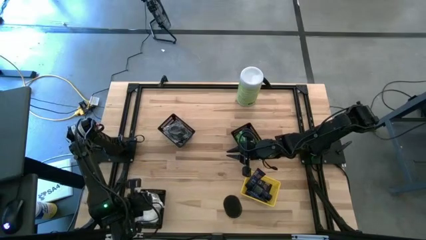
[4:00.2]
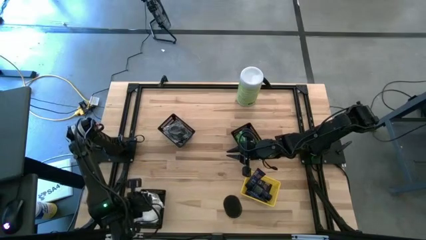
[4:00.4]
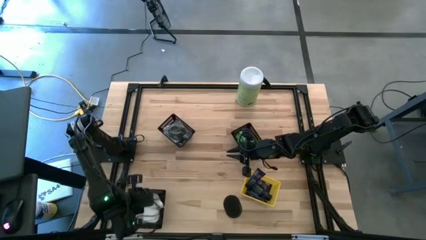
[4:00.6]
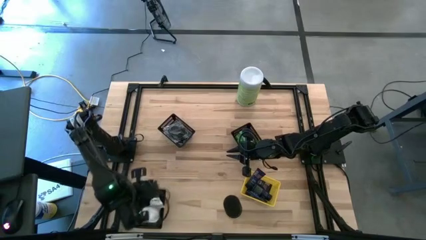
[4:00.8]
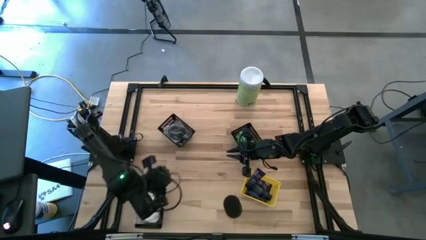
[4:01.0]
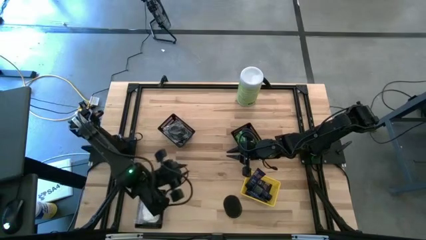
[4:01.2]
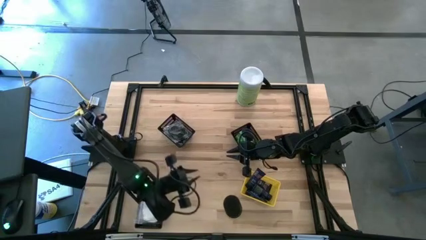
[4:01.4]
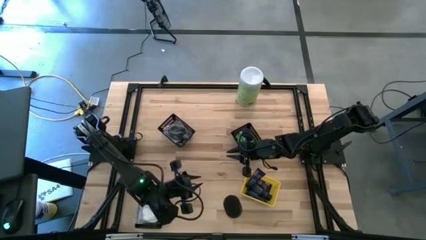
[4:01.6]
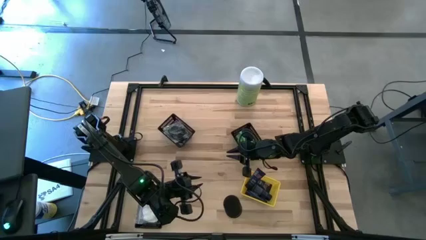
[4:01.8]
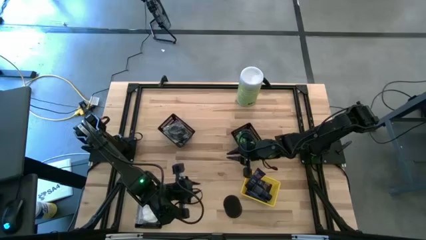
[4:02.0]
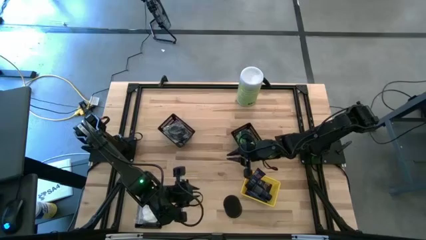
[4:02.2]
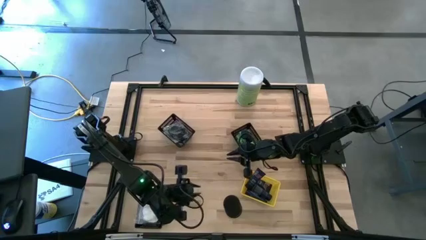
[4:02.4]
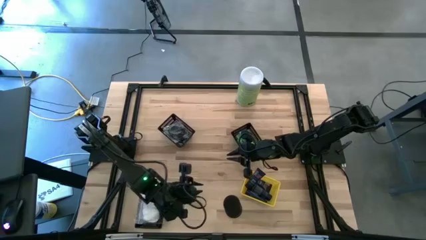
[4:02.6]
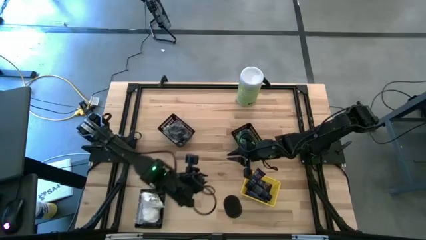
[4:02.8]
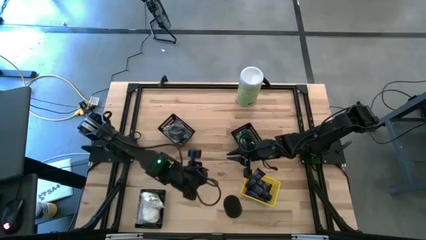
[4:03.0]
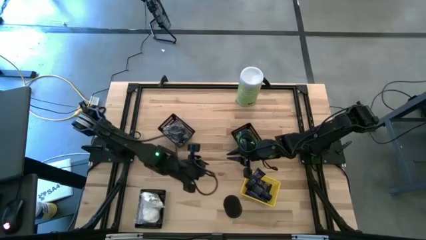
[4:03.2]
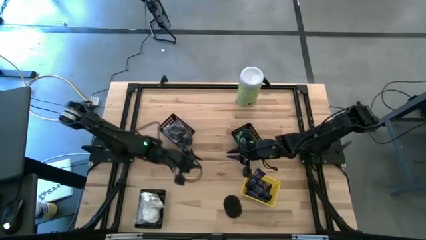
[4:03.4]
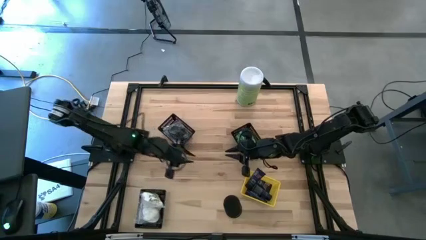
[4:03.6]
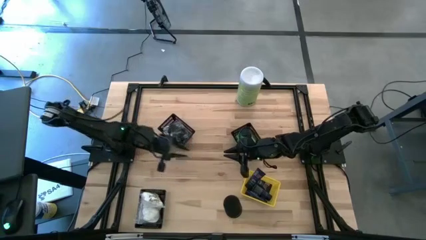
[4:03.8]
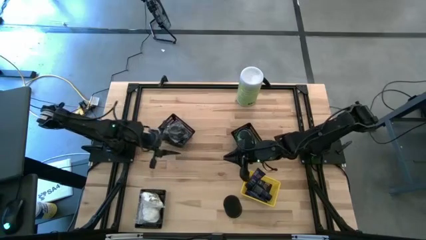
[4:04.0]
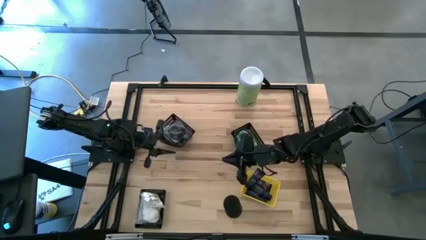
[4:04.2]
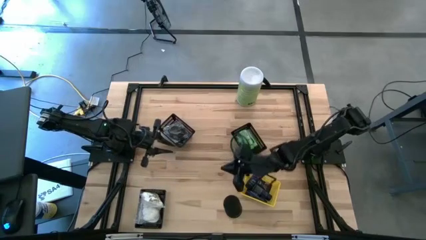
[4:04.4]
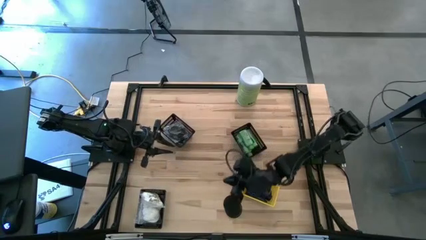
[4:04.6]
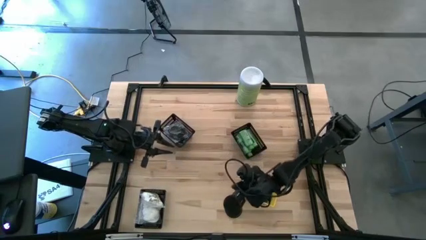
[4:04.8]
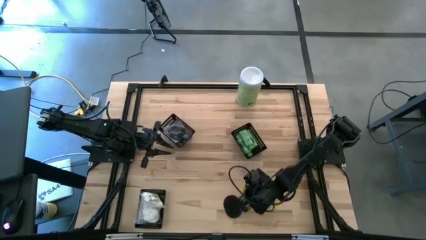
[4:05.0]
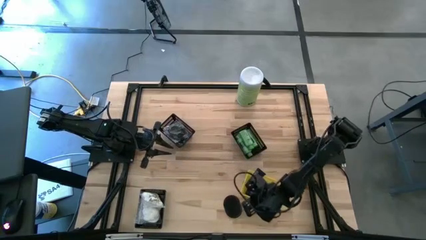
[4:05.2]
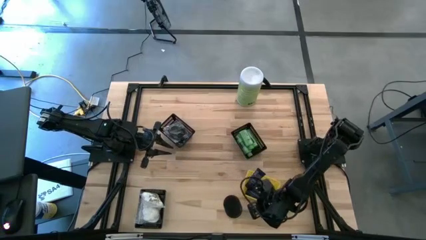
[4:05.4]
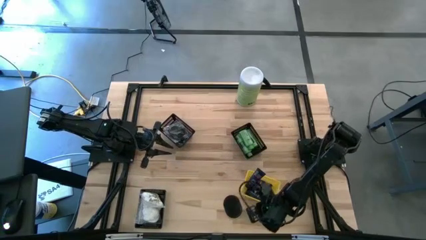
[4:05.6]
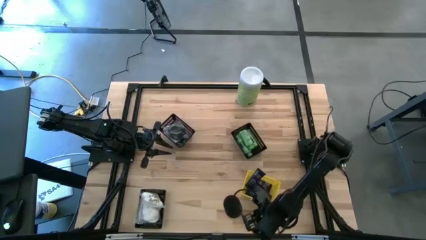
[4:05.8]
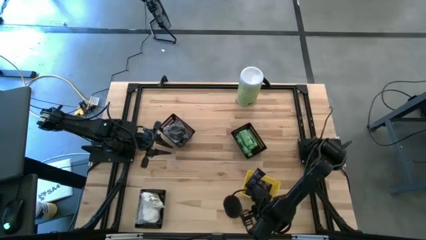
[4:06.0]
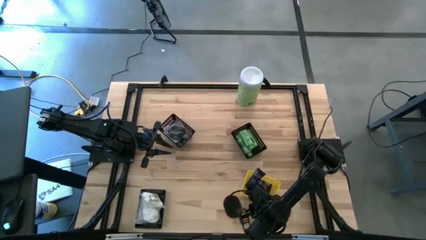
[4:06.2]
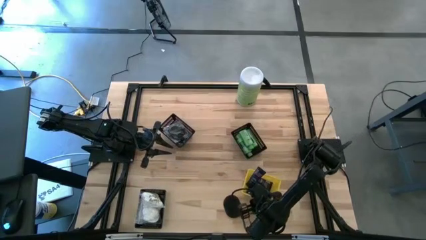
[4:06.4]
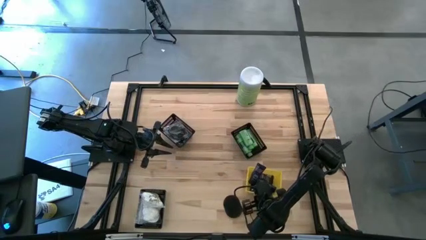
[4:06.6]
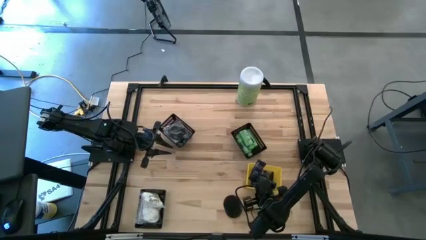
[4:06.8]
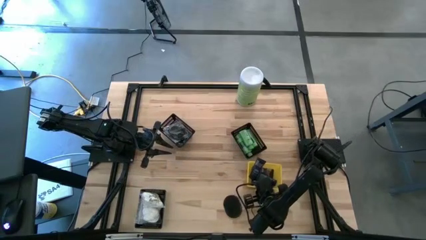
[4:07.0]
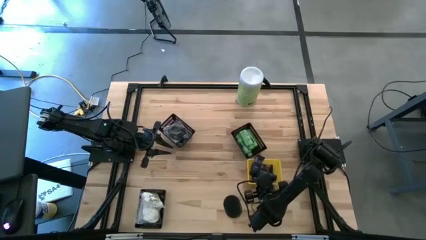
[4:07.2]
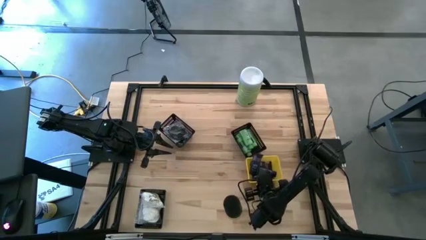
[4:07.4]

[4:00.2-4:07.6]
Task: Pick & Place Travel size toiletries
Adjust the yellow bin

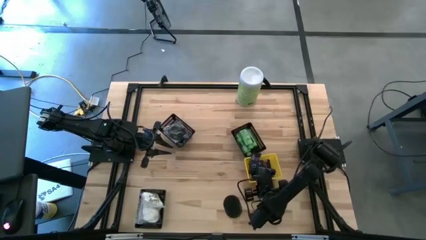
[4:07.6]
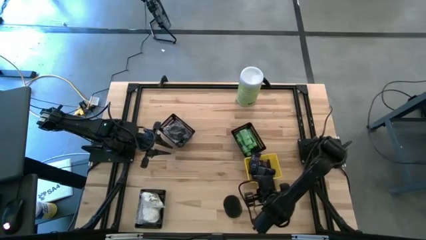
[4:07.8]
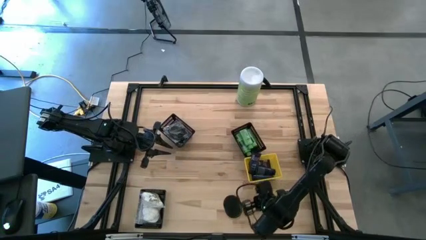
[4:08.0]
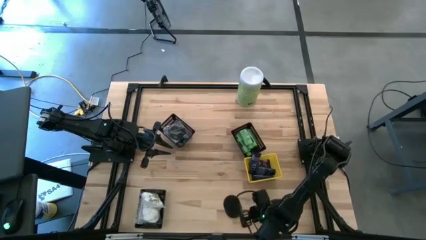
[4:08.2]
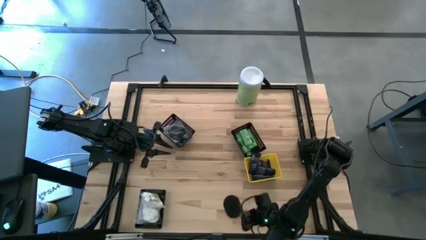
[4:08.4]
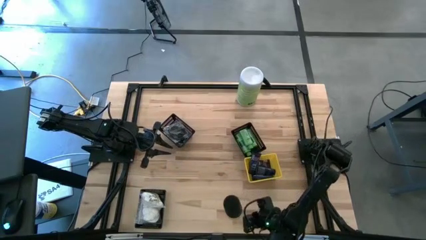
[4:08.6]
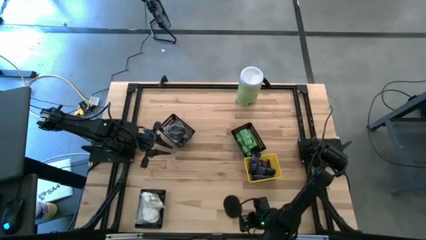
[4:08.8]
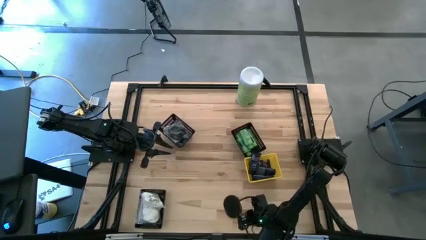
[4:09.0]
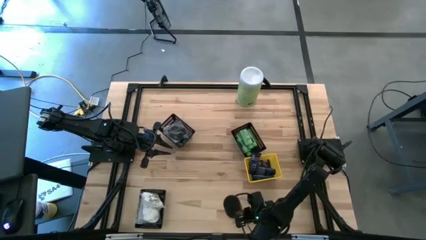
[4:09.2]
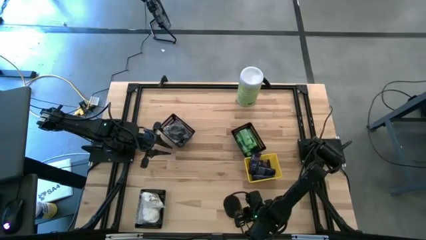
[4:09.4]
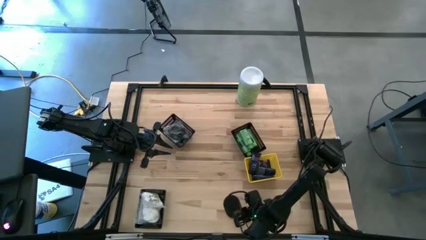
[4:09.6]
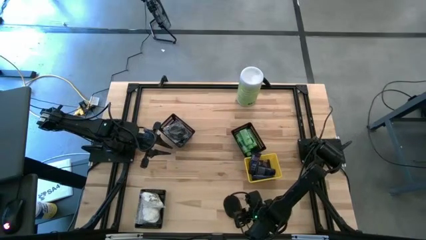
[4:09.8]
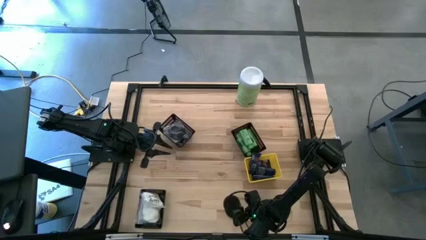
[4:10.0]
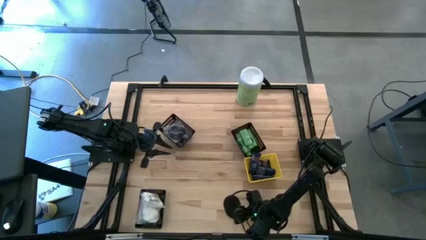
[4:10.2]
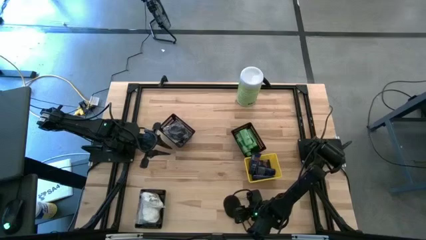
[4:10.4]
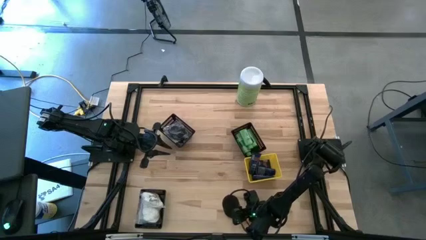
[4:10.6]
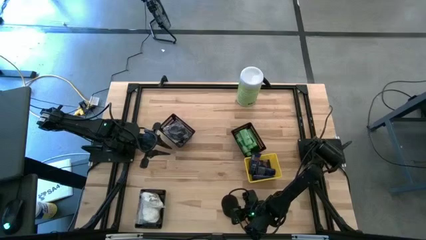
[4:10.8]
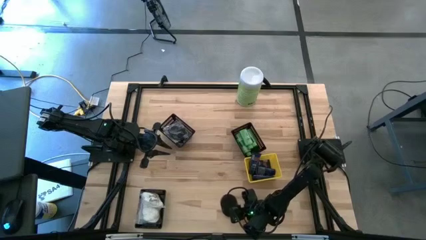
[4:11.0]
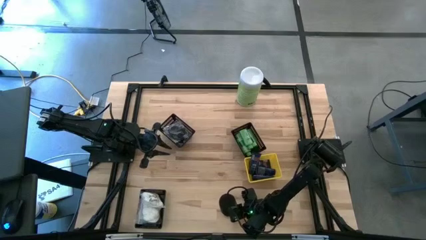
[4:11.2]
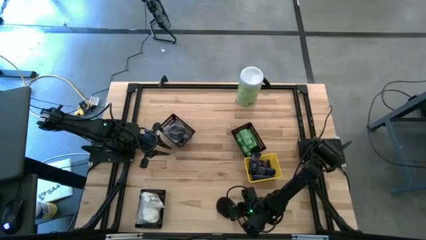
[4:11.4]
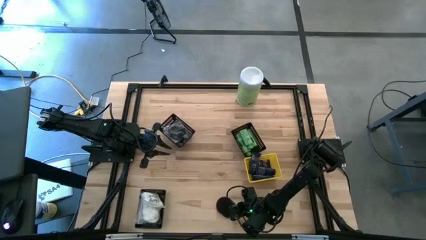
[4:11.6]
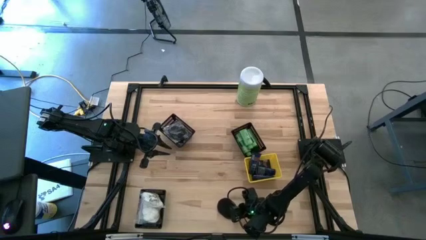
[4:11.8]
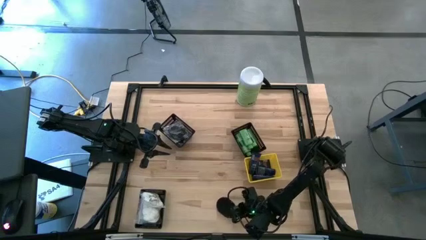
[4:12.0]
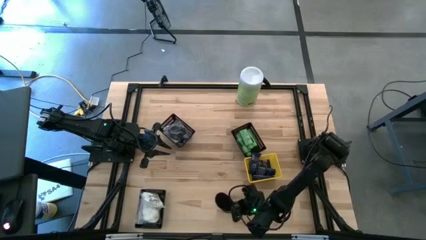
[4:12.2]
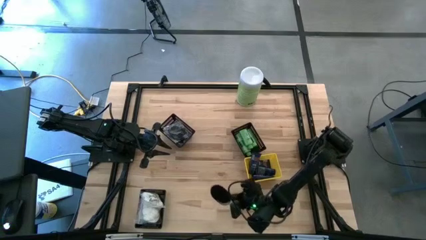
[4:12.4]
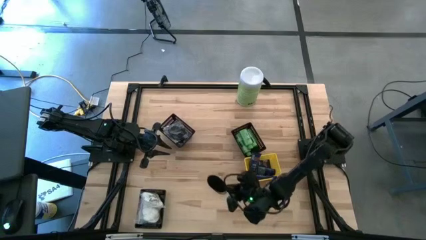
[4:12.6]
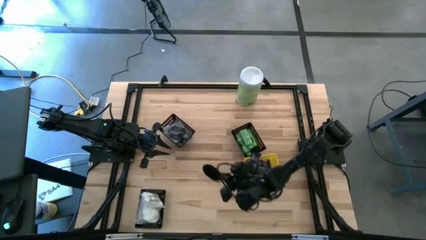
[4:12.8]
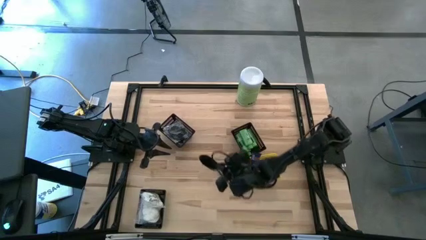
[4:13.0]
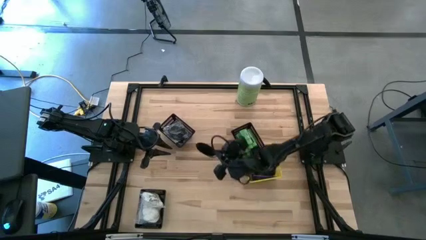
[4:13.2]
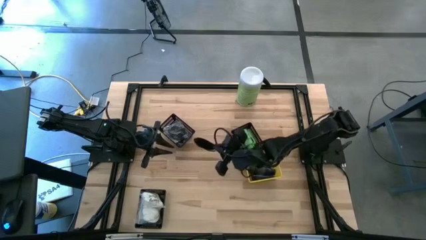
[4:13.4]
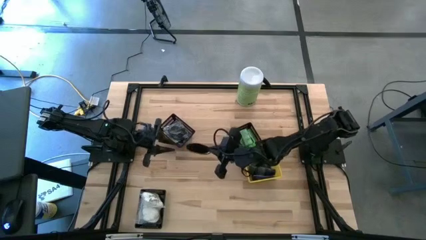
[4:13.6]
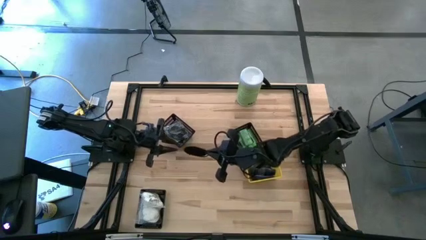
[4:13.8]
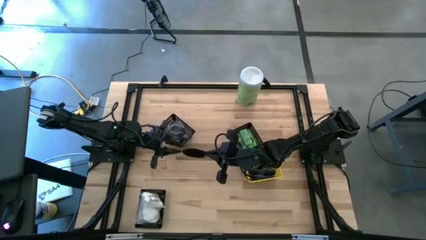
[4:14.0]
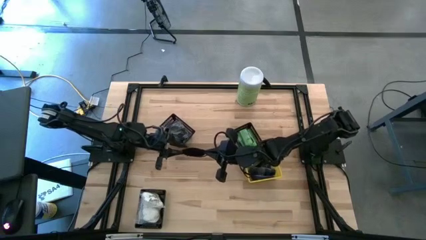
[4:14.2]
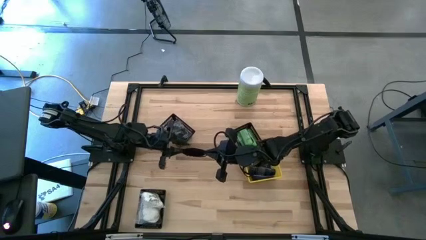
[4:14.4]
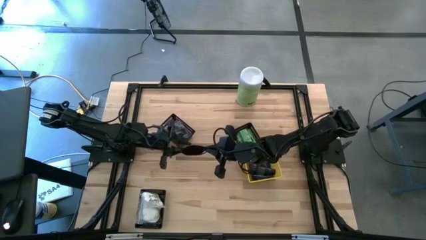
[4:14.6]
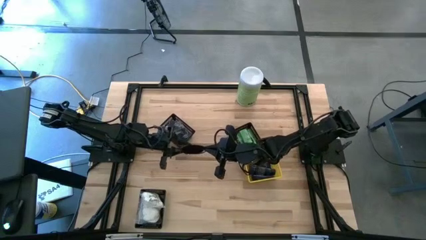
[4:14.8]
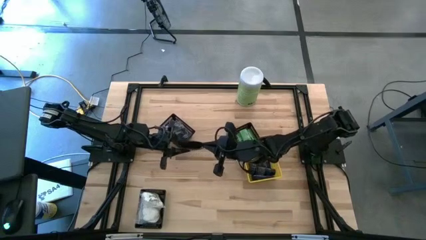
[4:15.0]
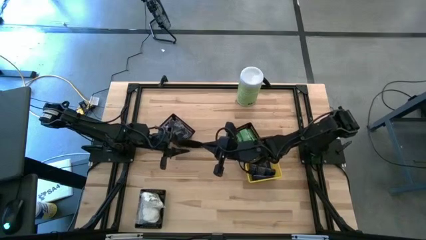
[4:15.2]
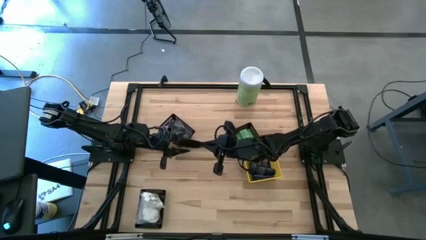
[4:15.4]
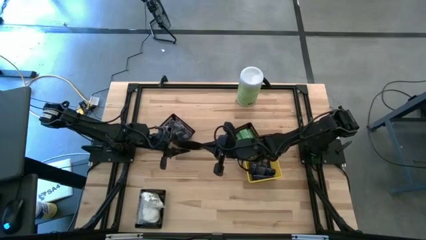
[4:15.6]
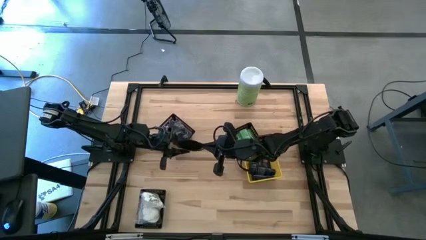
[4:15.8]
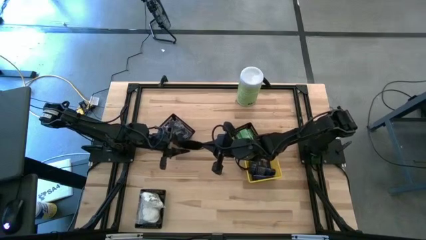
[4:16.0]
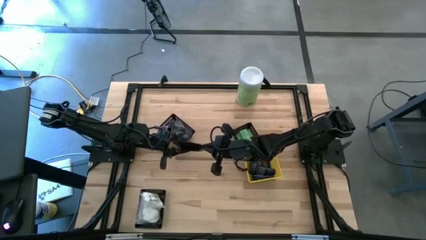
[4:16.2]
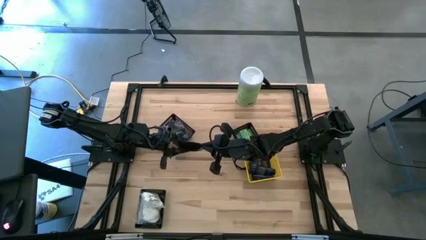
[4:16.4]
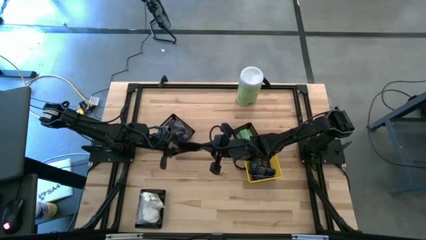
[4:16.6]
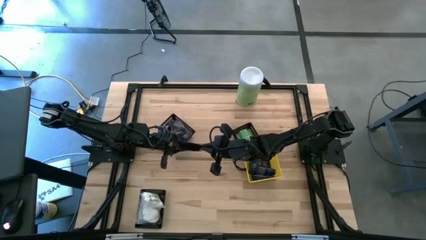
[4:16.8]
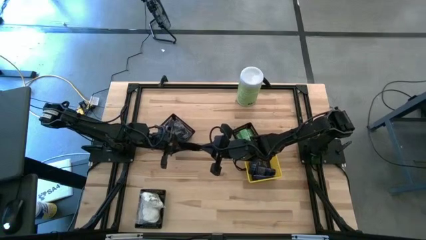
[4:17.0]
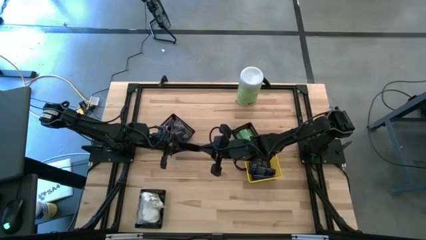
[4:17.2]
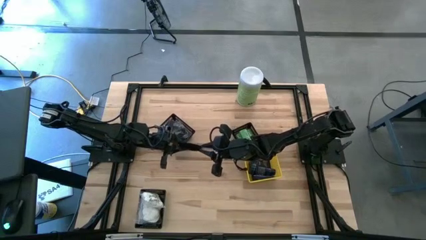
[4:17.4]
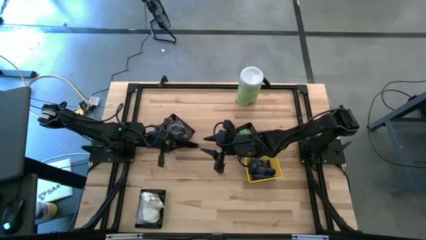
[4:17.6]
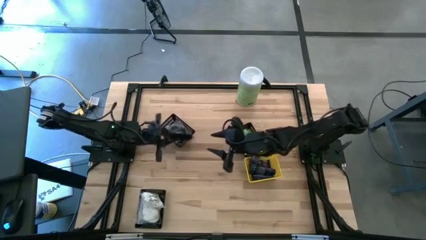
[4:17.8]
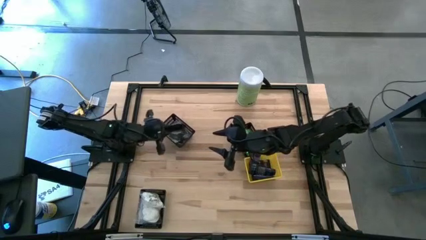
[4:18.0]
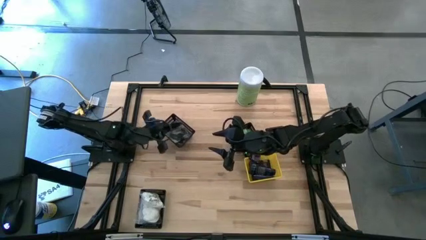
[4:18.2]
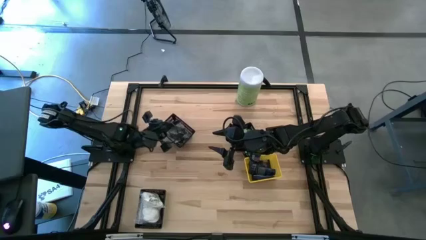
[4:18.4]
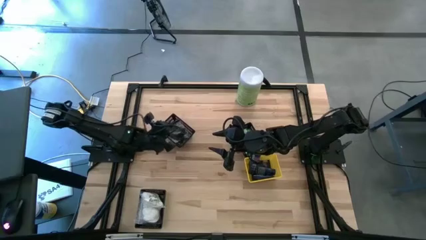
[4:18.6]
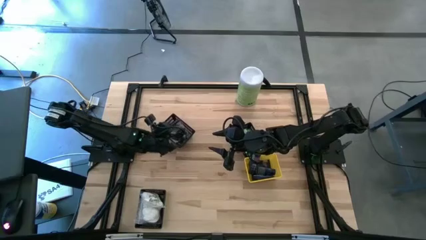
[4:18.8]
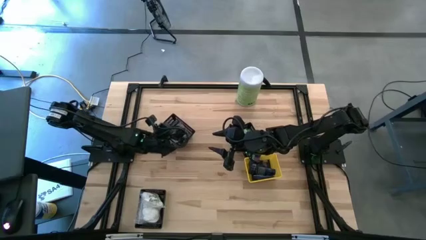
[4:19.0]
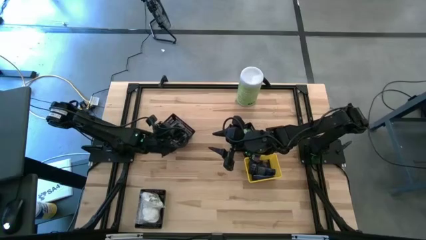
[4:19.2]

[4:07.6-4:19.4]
Put the hairbrush into the top left black bin
